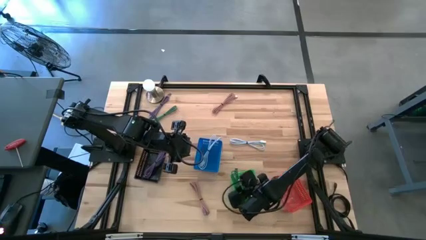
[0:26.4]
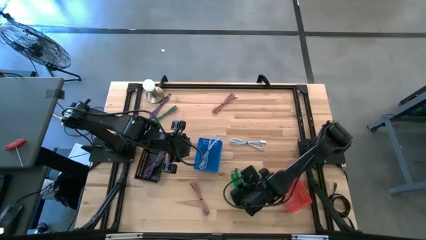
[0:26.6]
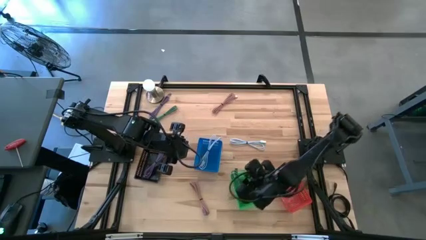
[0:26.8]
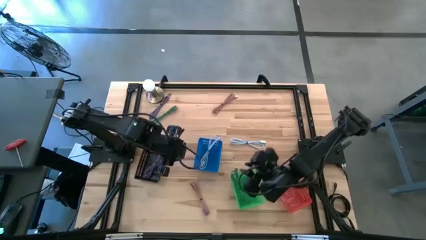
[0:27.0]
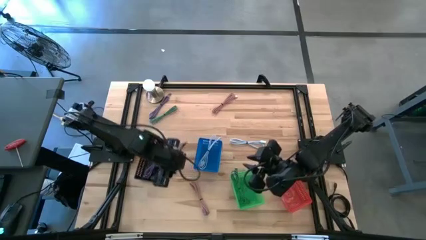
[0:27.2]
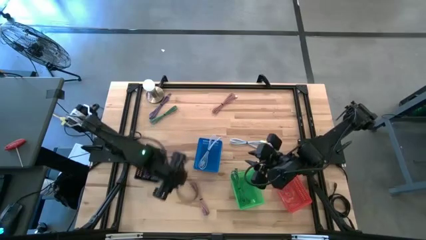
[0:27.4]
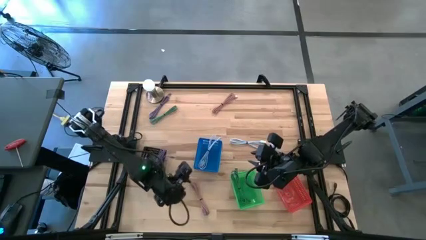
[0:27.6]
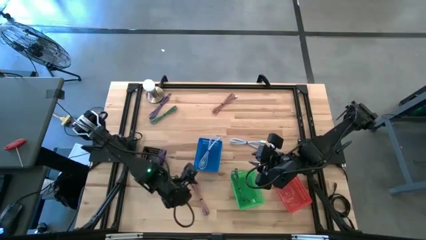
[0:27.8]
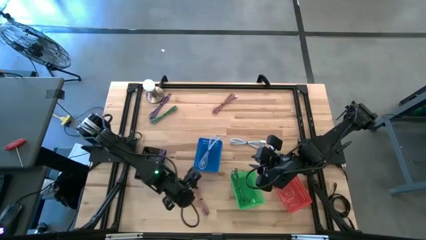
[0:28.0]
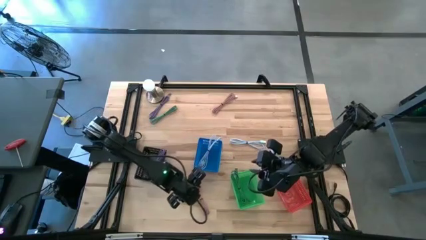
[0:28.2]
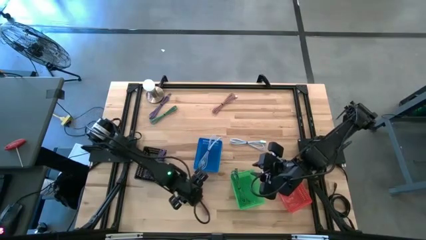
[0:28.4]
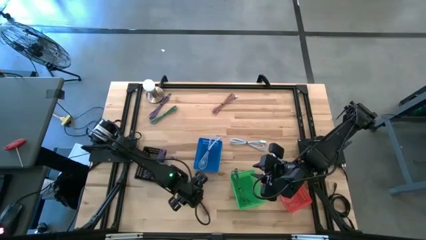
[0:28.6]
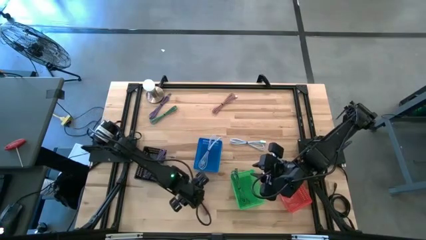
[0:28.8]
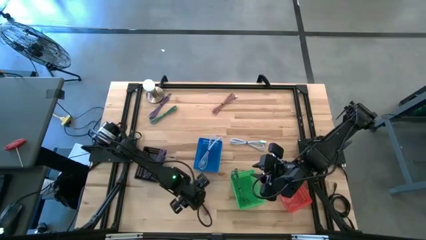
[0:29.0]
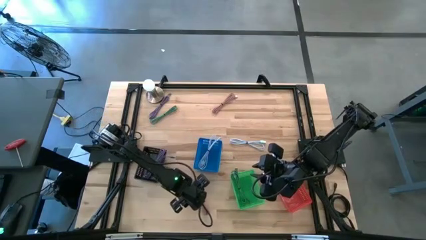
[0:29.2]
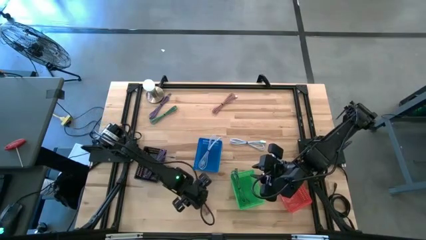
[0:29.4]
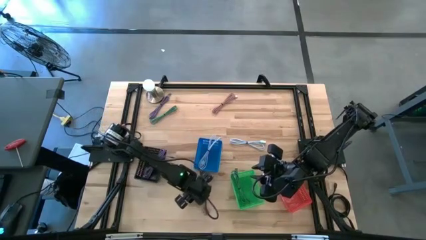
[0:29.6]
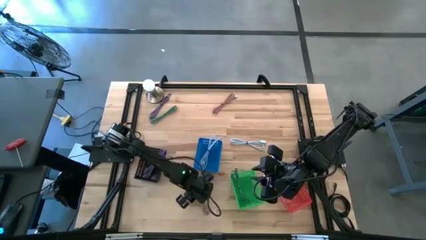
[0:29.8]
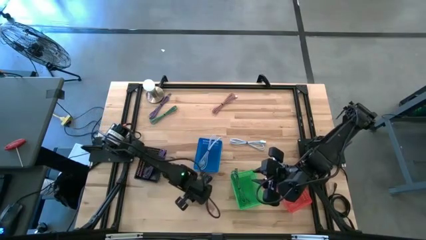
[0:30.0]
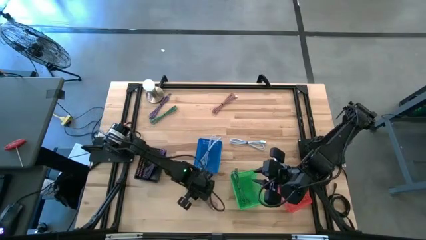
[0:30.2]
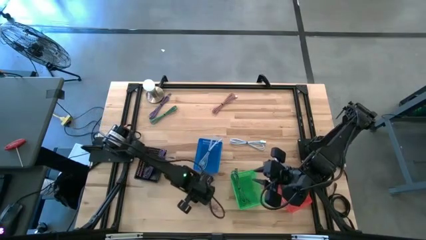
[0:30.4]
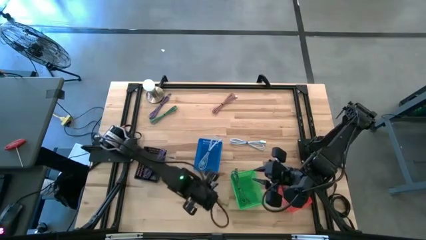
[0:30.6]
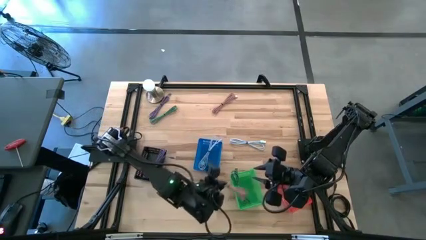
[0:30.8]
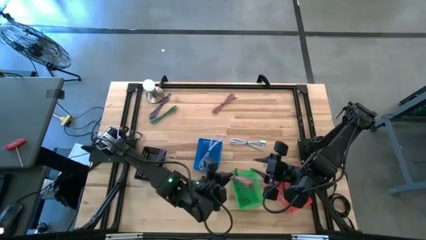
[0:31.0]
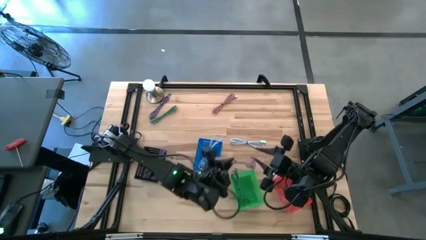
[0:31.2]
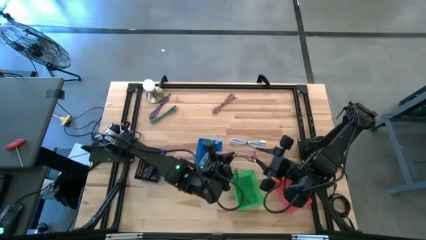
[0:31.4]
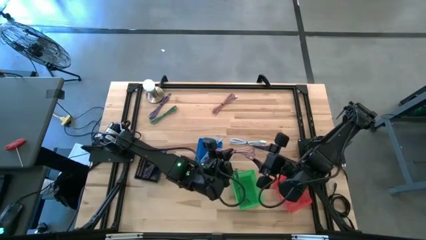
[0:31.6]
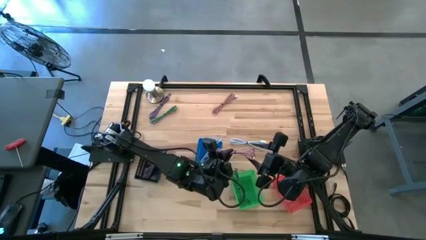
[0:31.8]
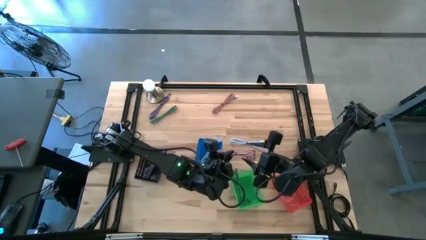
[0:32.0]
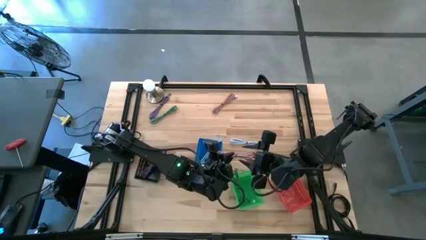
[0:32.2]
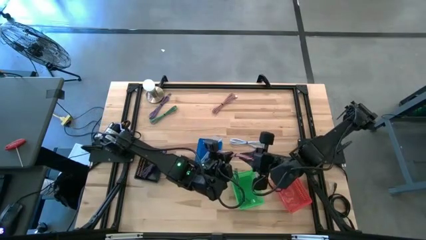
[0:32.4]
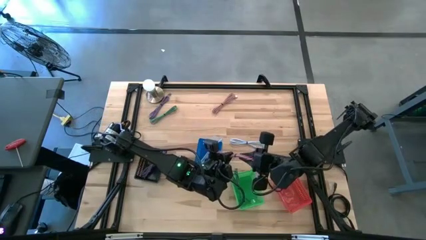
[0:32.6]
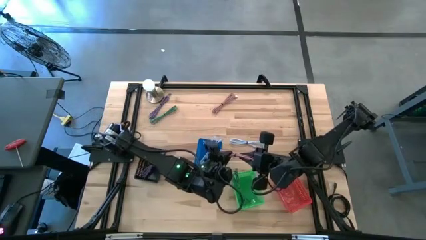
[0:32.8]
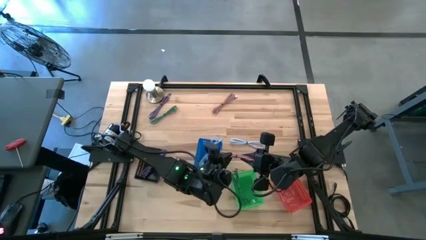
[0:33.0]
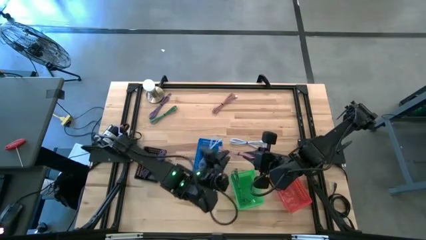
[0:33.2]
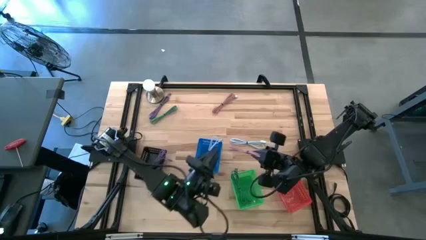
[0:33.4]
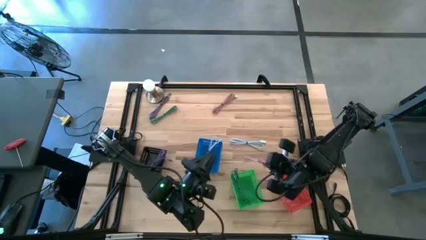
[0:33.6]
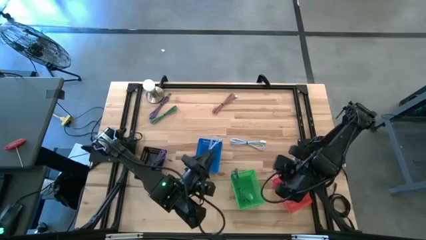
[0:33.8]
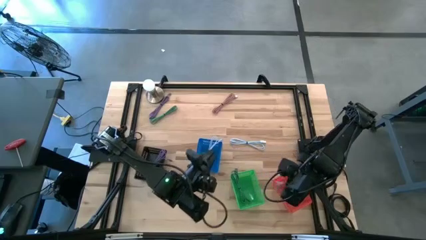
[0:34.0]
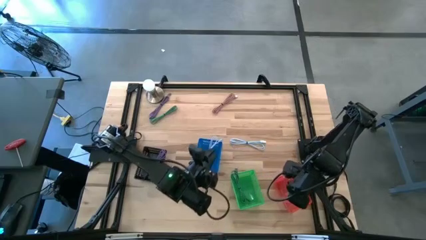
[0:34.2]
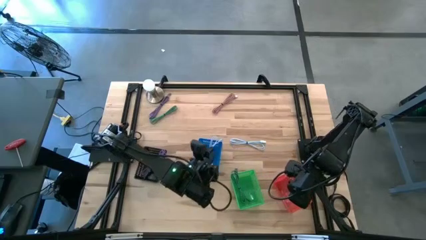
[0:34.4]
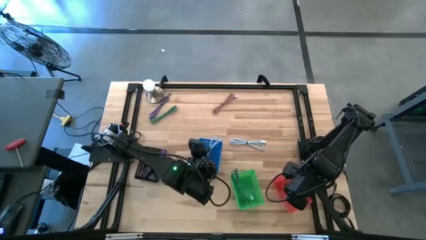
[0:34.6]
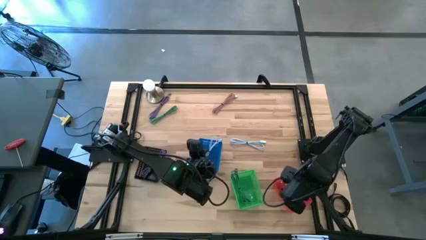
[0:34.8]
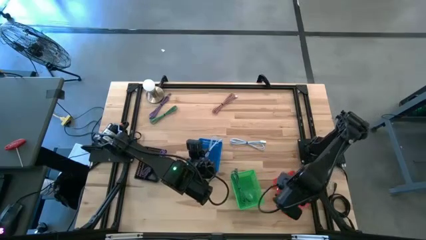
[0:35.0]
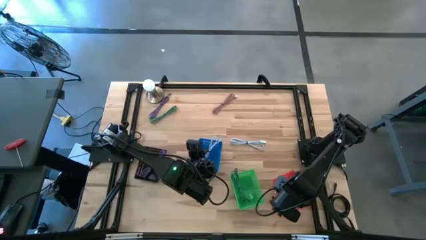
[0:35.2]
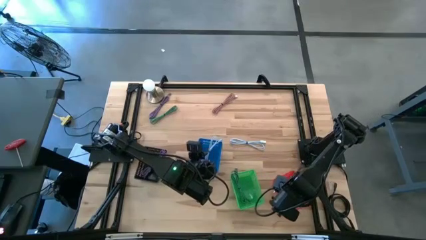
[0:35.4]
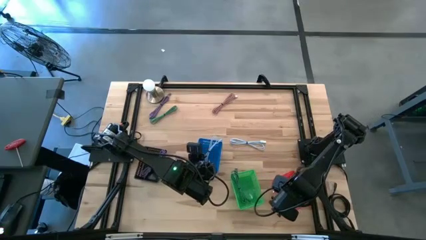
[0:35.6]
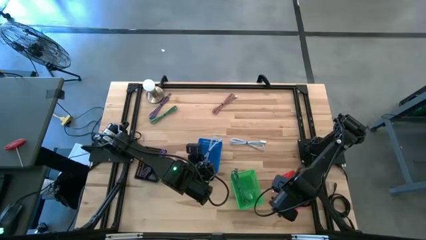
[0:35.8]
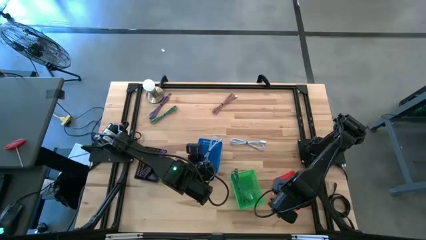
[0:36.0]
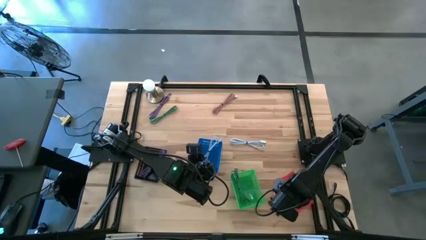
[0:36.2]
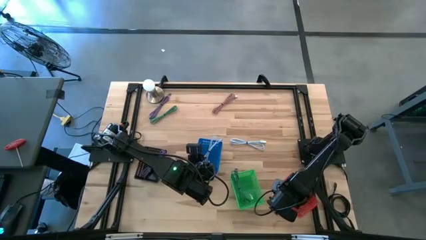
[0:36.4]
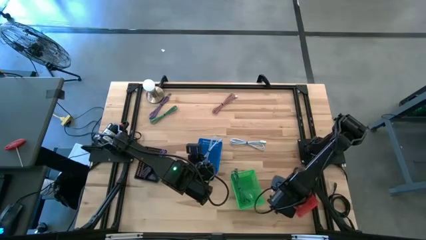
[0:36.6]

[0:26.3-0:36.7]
Task: Pick & Place USB Port
Put the bottom pink USB cable into the red bin
